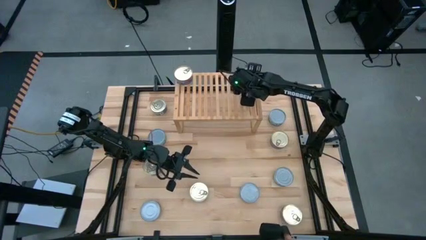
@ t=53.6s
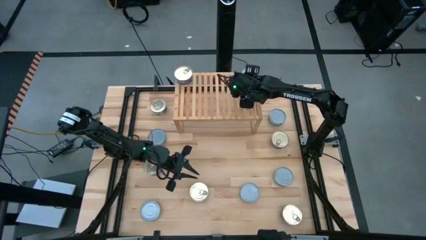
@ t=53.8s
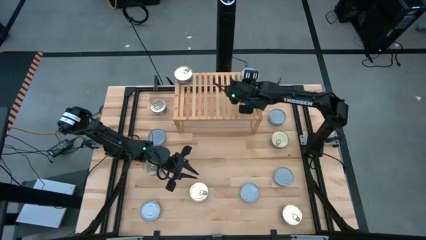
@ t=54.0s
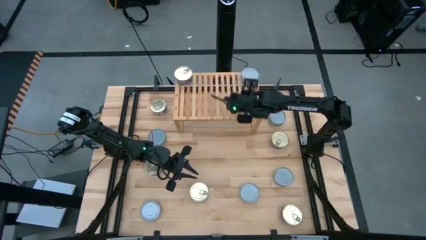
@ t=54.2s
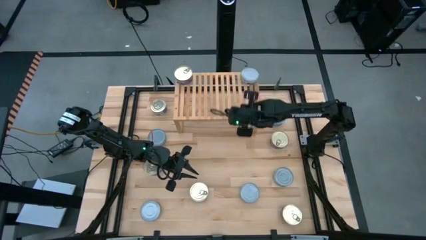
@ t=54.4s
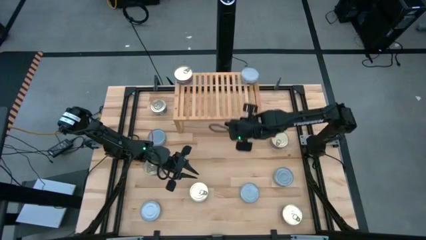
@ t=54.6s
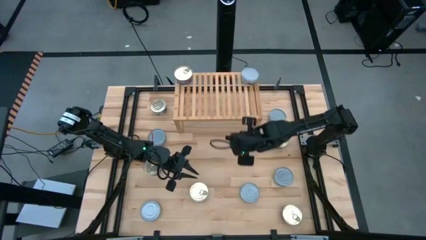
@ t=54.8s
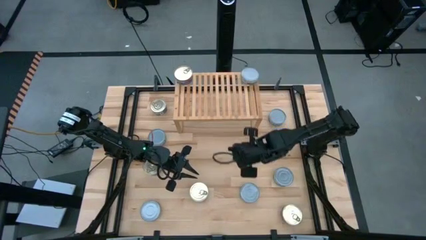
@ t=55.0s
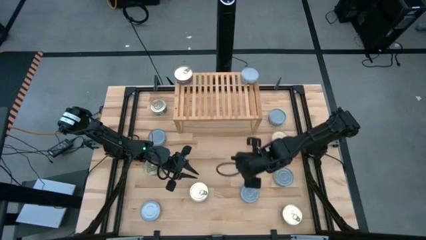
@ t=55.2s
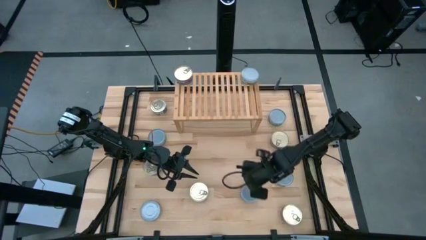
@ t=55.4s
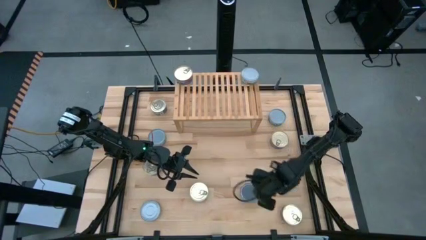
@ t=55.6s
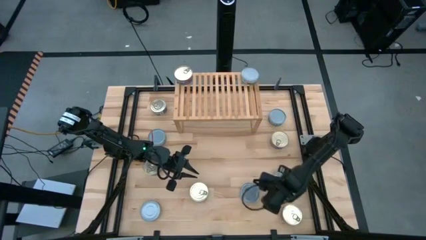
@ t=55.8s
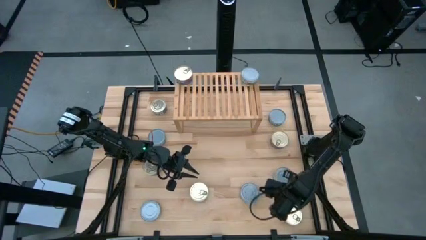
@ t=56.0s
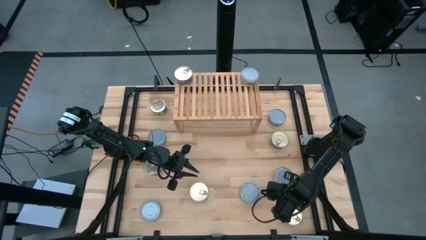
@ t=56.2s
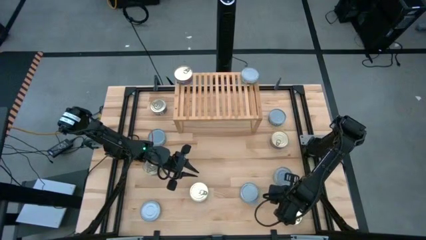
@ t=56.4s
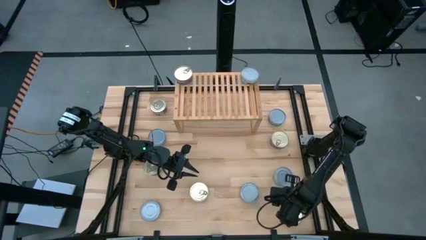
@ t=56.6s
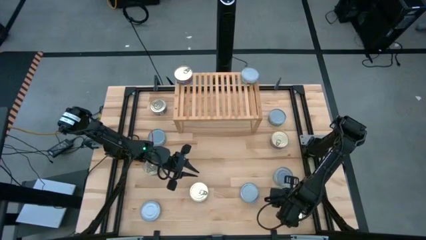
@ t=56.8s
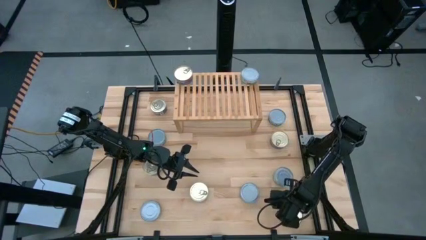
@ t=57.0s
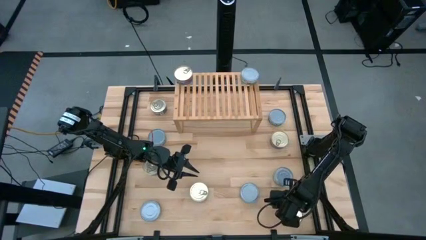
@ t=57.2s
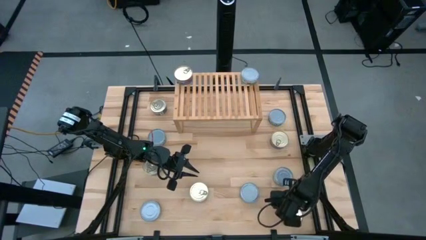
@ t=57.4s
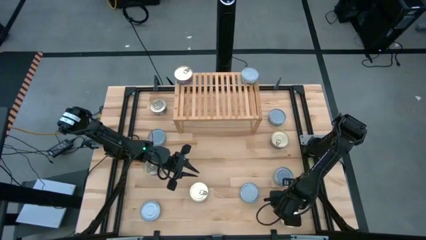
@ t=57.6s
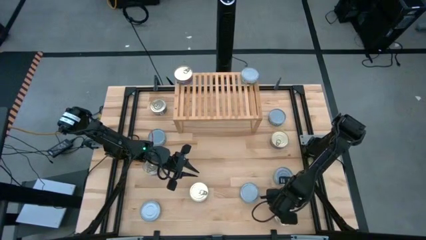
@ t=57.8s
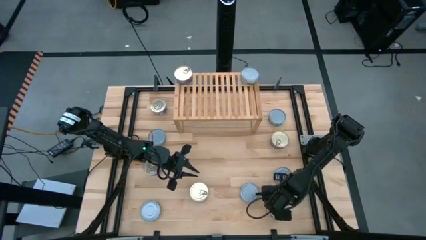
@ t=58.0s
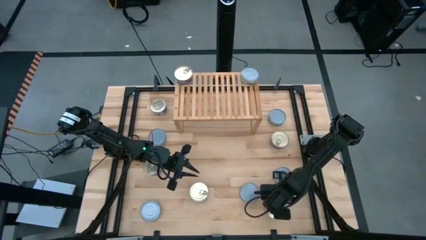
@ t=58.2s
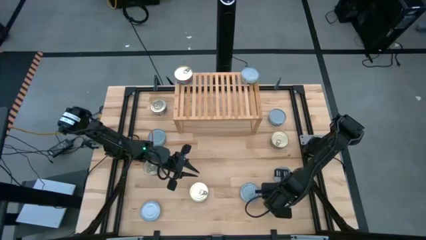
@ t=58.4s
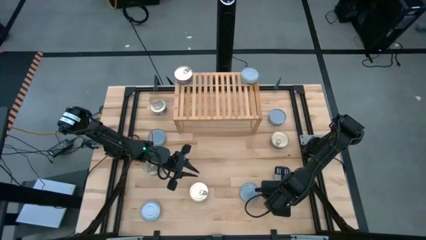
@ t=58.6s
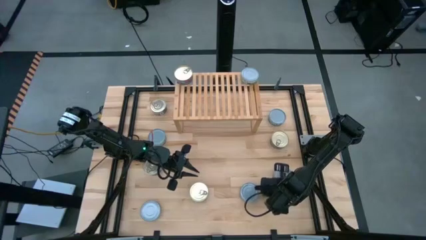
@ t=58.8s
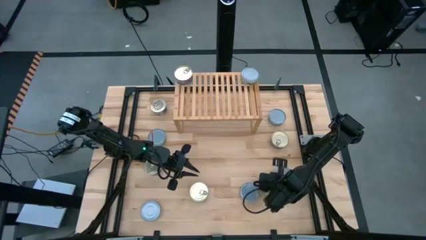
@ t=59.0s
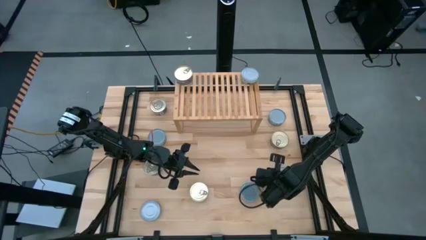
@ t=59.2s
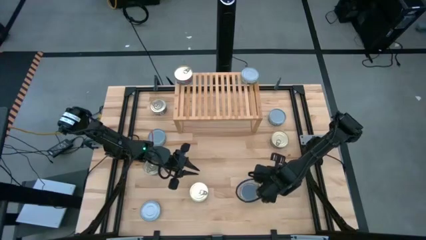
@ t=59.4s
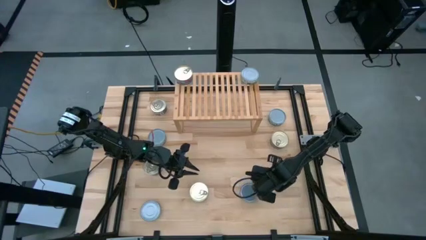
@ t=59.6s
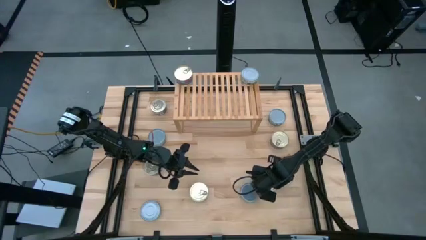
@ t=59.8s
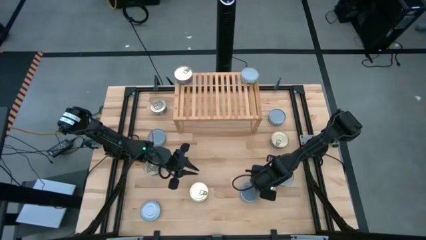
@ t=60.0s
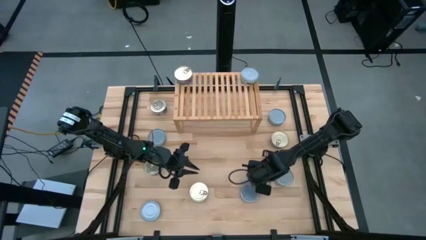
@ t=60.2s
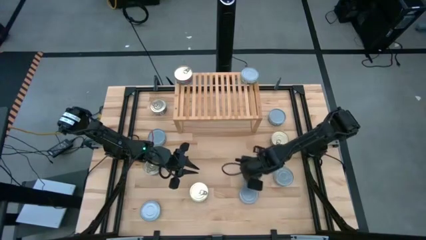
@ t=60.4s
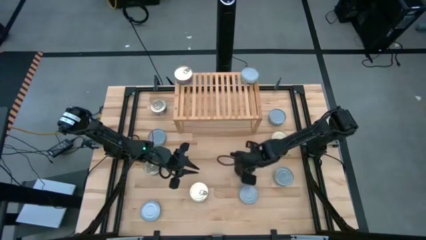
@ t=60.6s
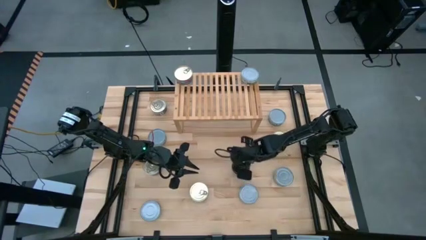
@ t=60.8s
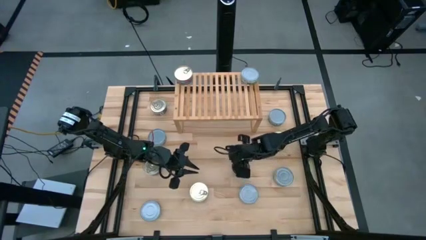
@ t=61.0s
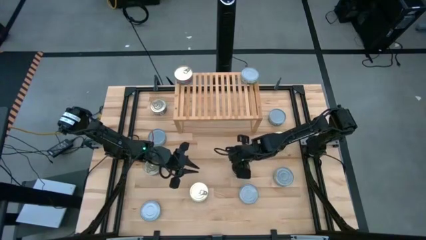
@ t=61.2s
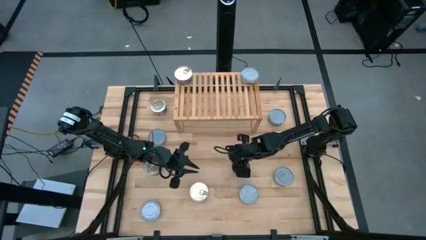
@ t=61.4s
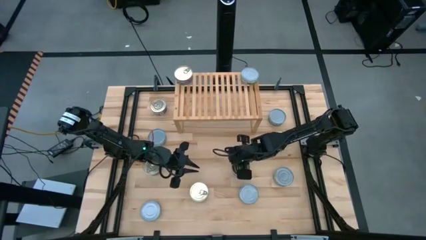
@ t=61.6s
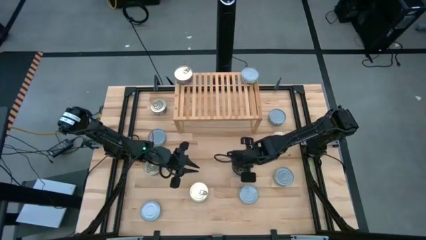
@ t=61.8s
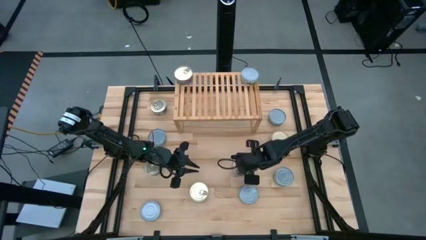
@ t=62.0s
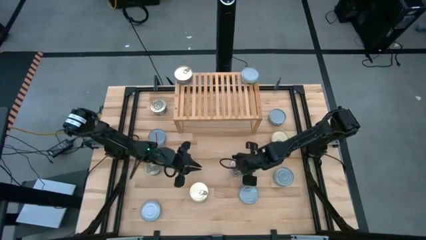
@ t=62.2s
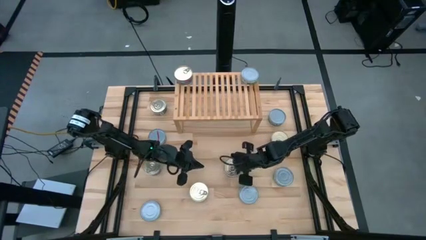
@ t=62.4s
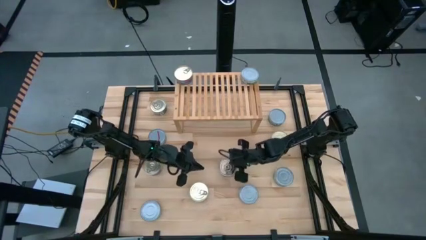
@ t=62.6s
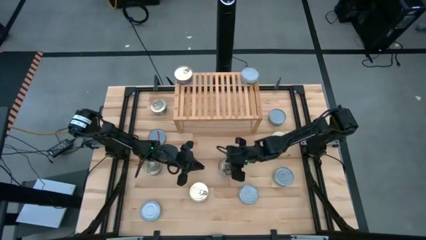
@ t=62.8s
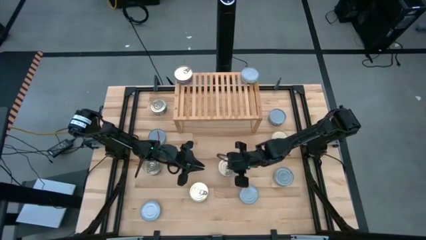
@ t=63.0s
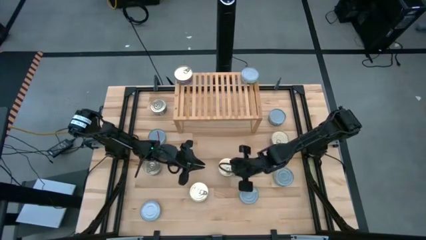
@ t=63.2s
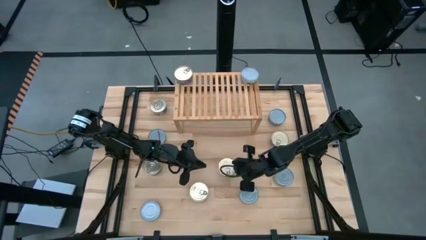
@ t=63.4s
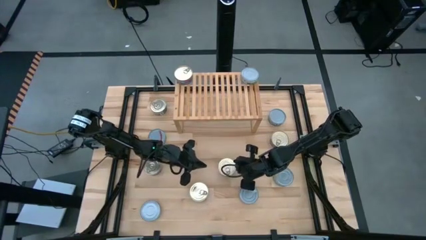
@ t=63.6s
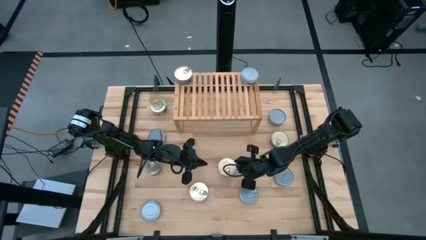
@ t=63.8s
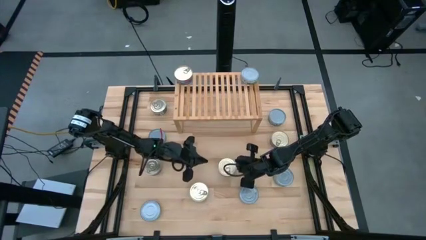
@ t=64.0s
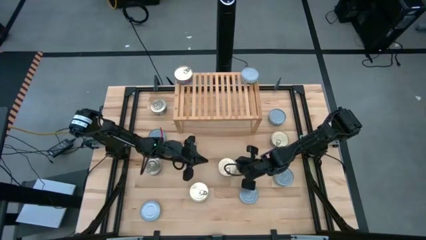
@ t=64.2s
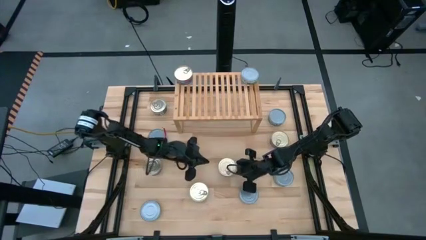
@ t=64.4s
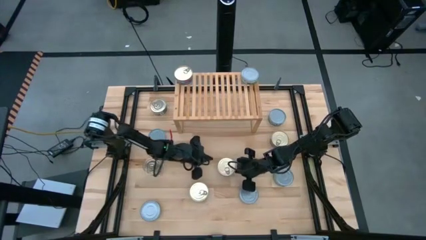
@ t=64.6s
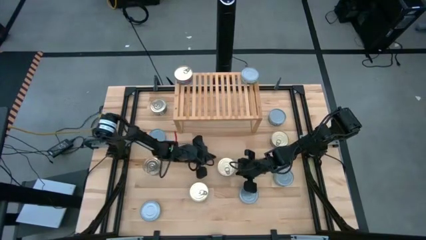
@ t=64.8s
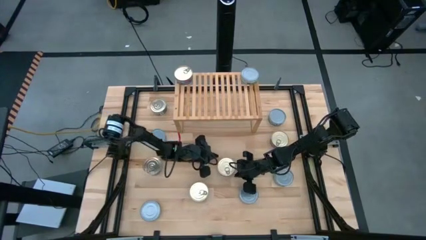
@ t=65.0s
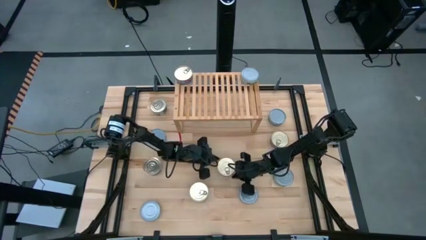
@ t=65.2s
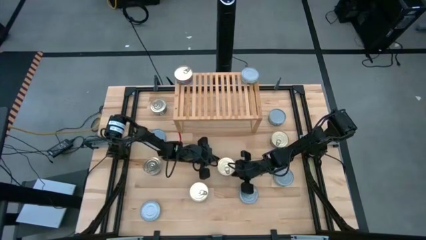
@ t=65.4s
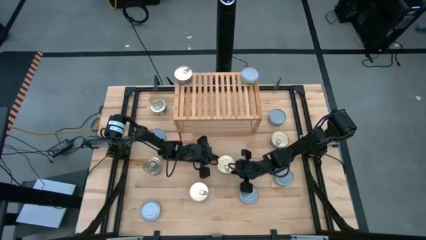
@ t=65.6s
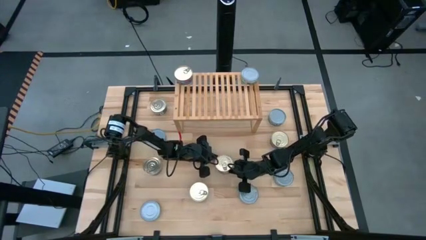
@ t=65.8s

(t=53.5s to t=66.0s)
Task: Stack canned seafood by type on shelf
Put the blue-pink tuna can on the shelf

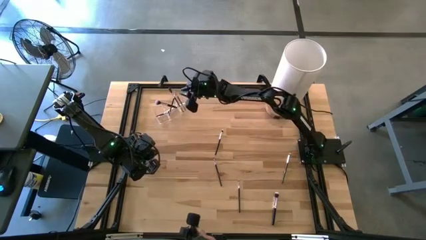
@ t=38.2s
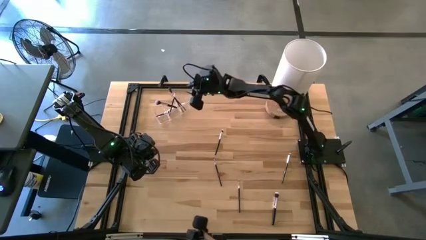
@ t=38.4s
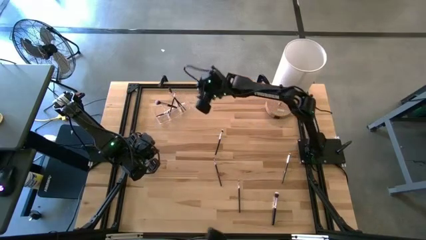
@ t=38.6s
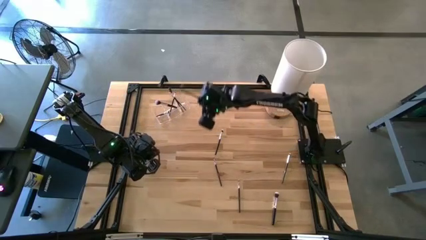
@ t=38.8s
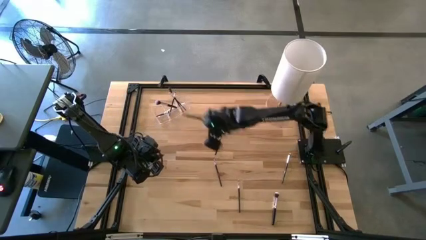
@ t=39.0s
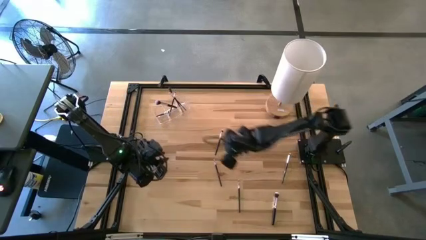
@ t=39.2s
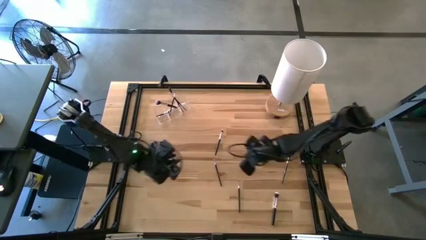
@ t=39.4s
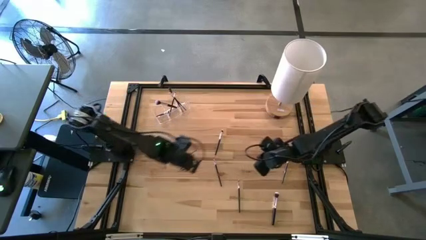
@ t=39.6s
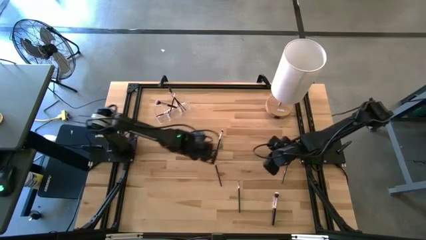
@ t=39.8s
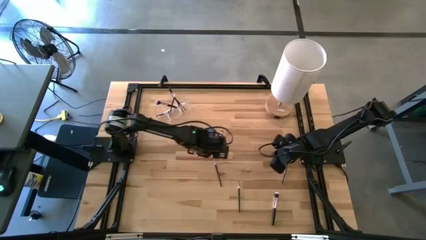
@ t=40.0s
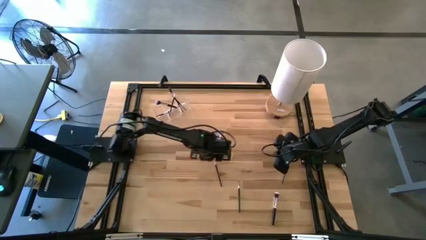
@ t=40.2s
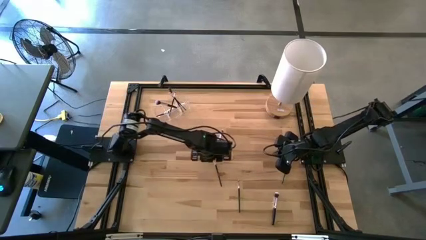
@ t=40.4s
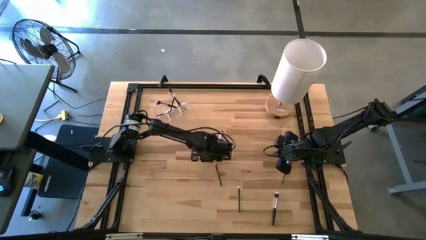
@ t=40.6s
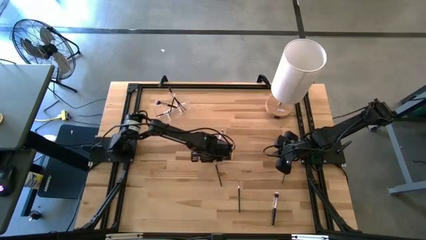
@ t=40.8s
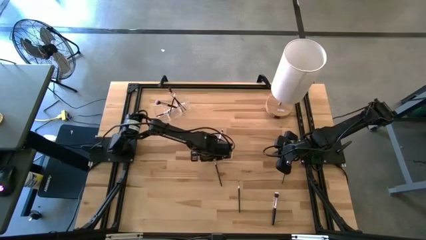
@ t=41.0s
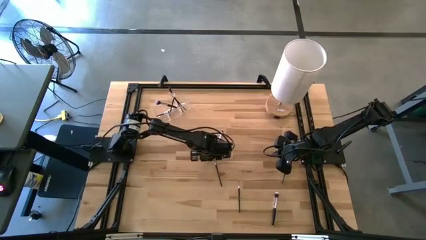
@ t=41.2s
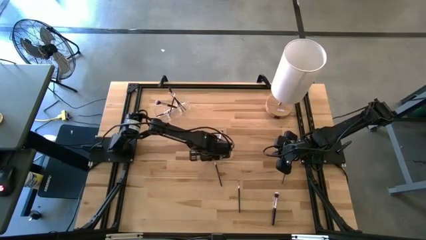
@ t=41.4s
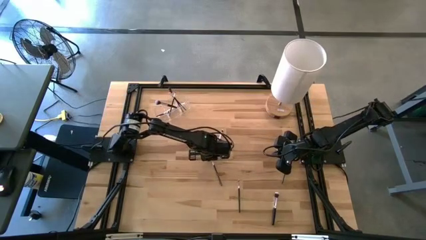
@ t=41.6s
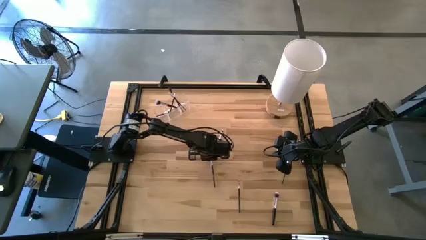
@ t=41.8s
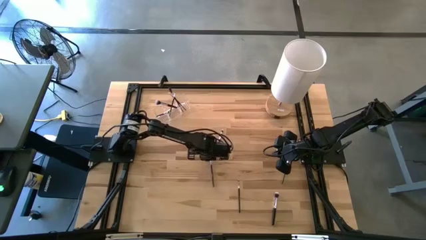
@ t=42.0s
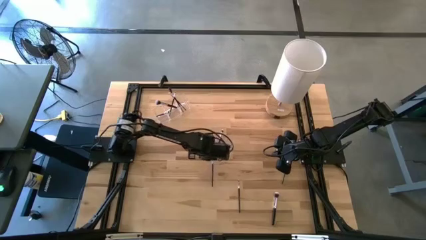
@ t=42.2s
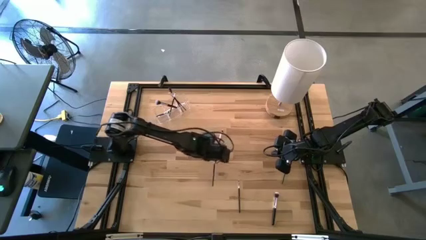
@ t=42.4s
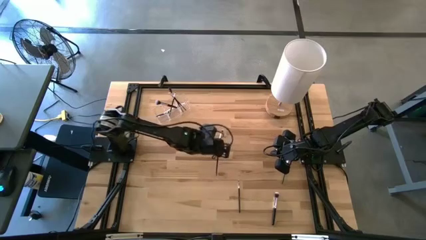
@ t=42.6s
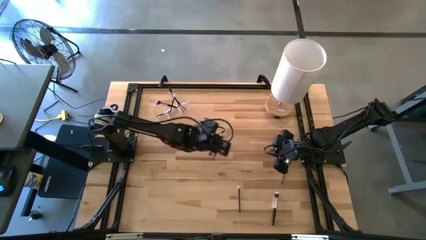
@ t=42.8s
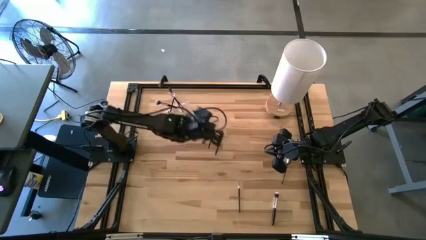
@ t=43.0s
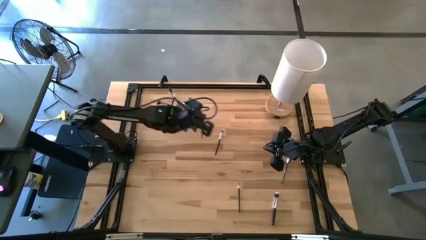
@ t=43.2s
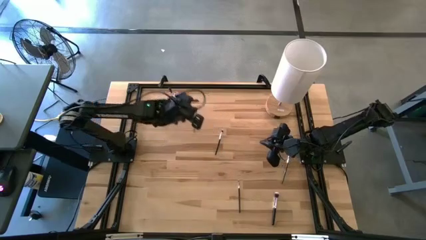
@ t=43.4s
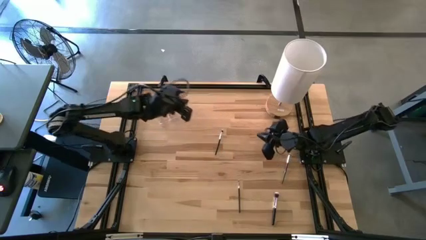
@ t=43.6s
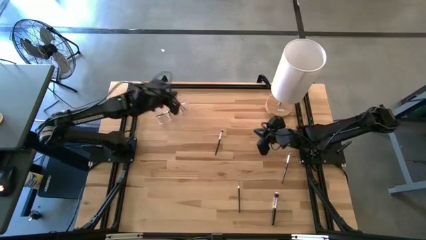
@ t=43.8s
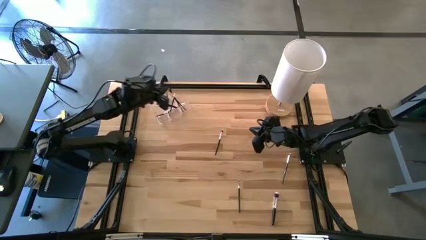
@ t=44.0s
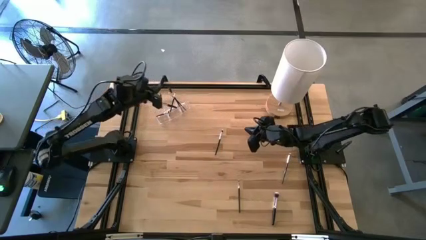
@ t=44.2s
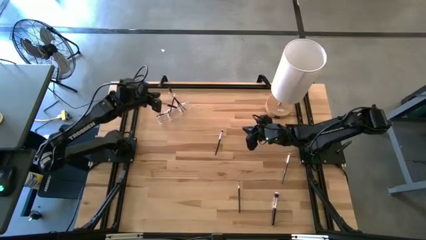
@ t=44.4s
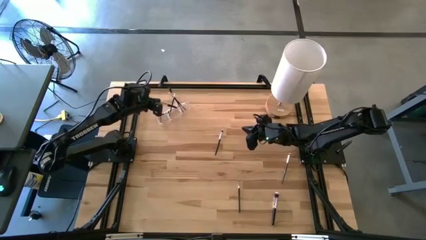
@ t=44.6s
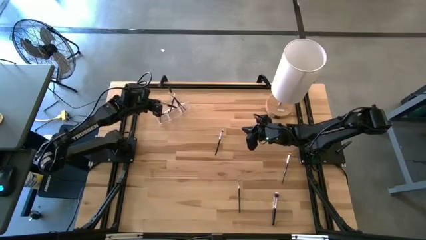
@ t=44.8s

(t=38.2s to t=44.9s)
Task: Put items in baskets/containers
Put the eyeshadow brush into the transparent organizer
